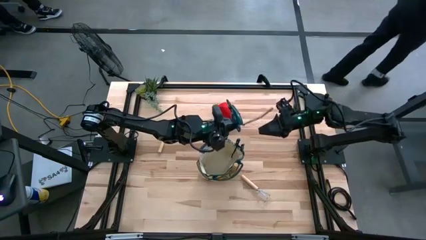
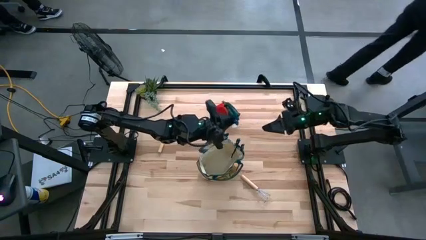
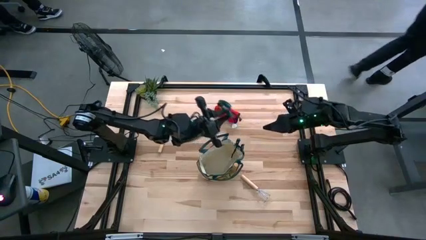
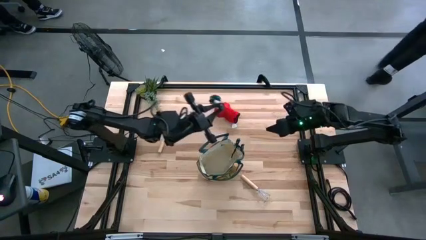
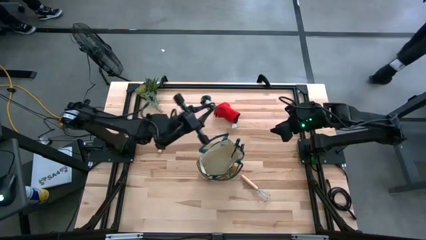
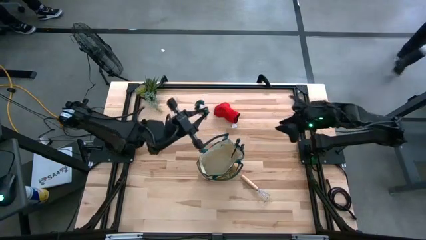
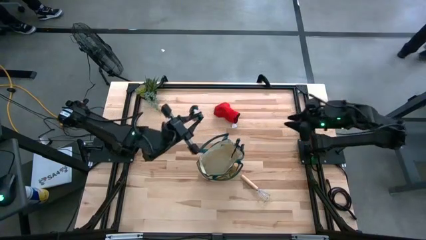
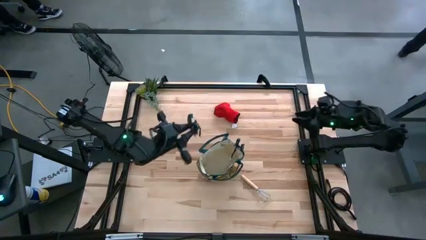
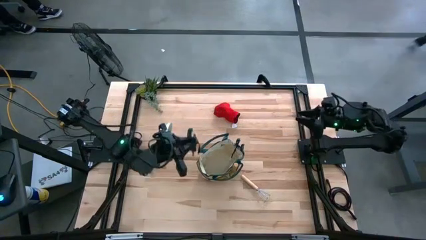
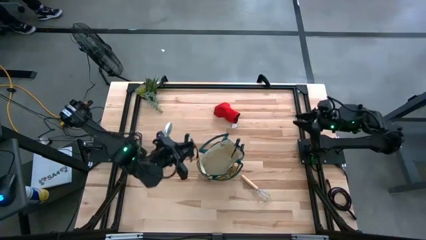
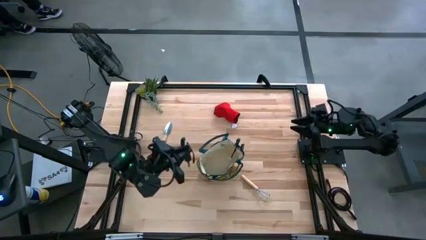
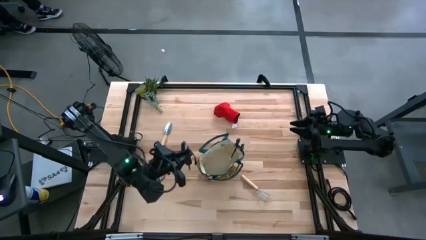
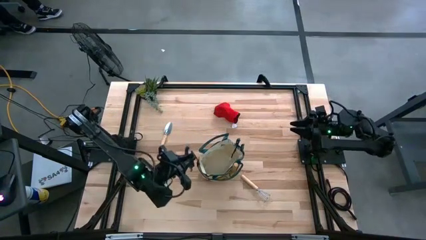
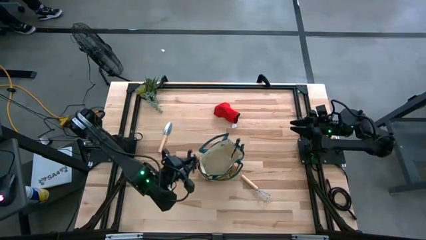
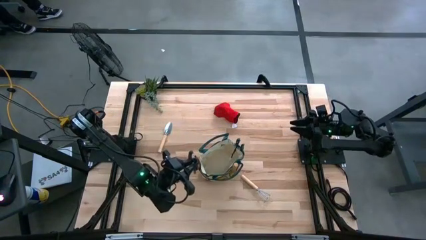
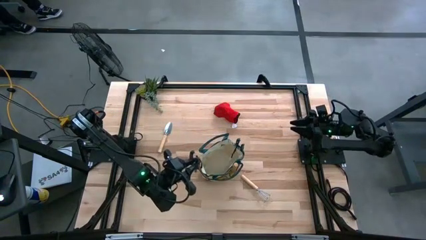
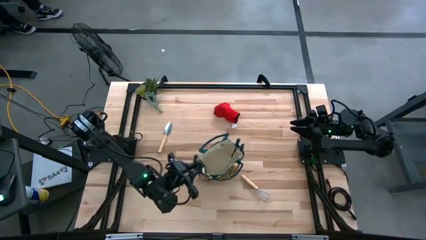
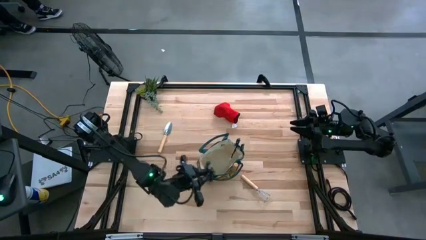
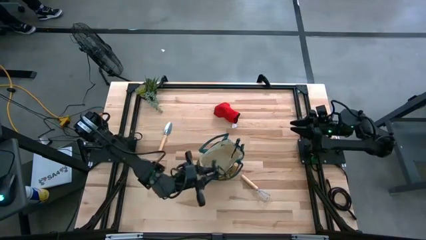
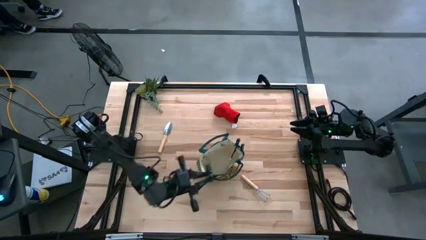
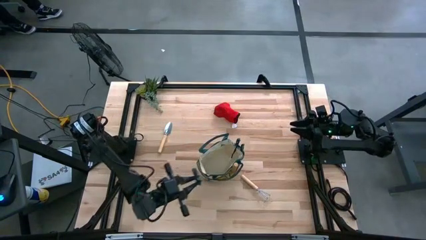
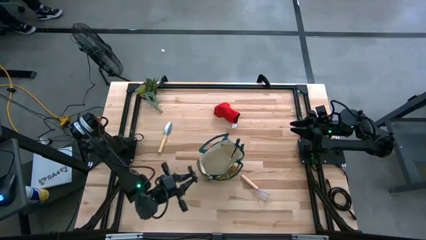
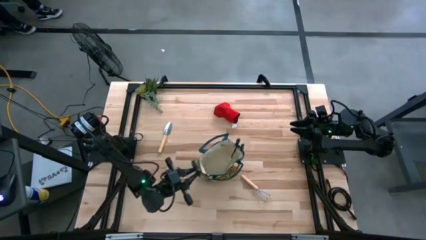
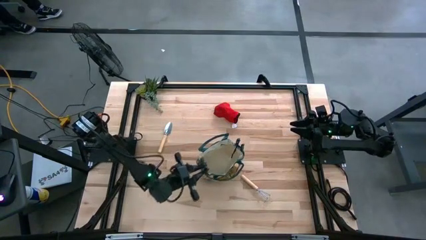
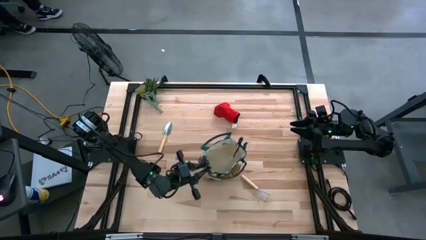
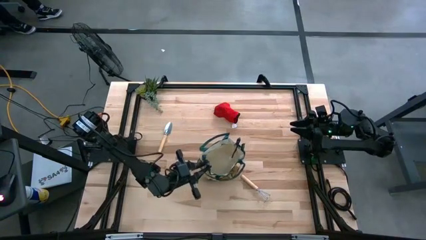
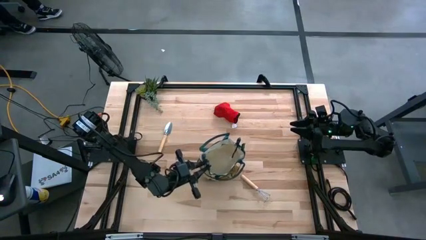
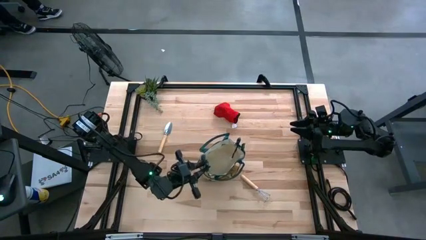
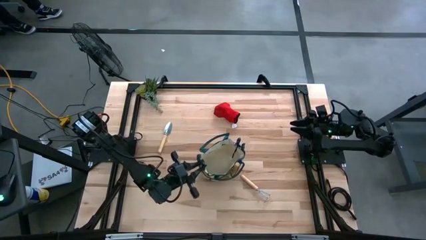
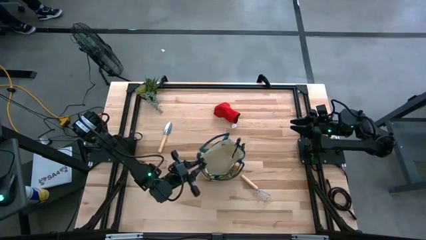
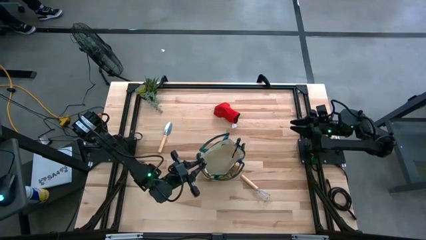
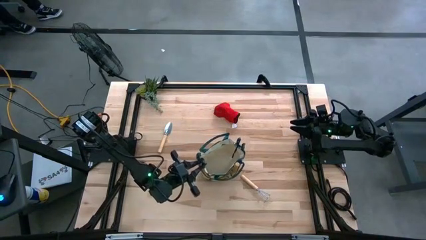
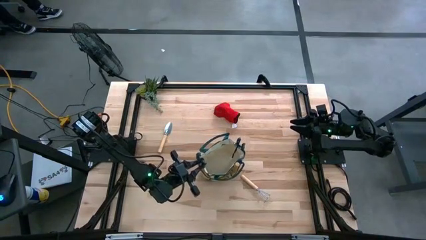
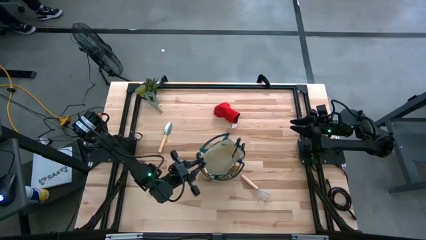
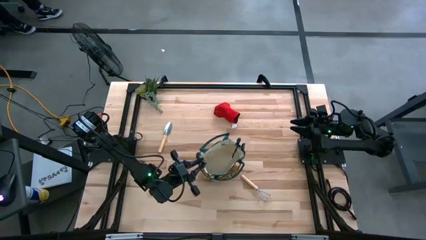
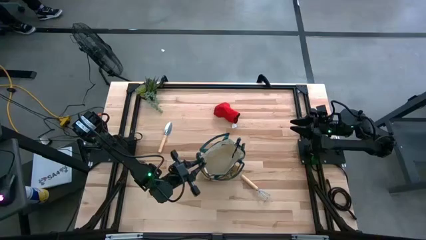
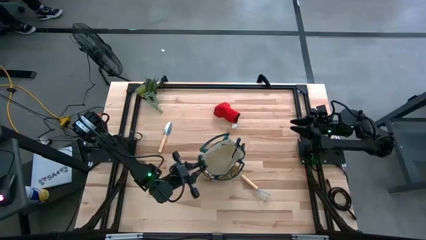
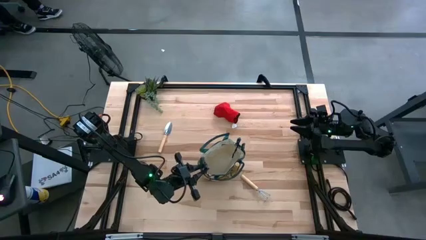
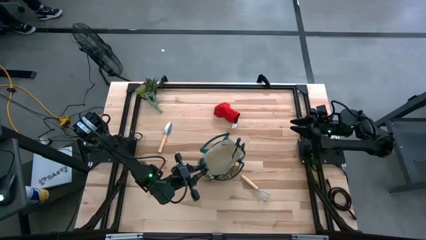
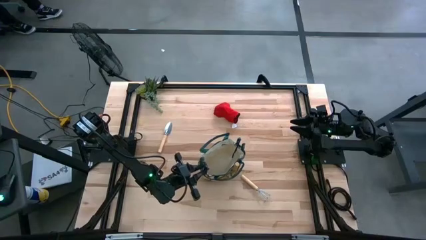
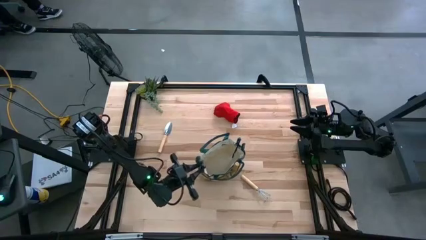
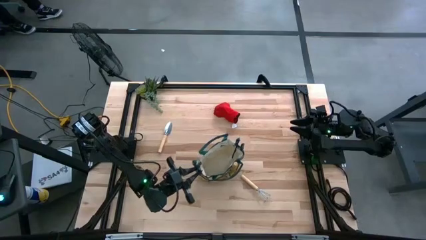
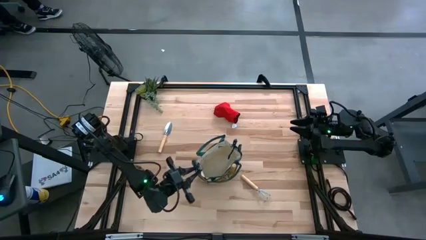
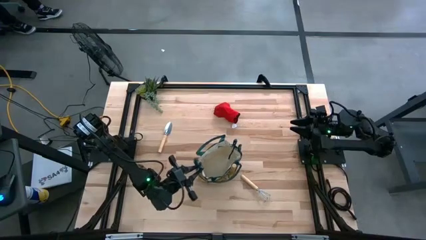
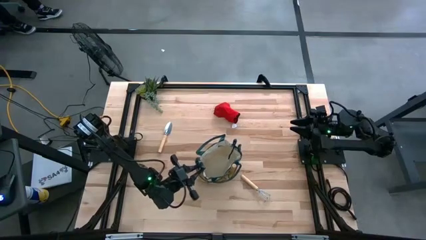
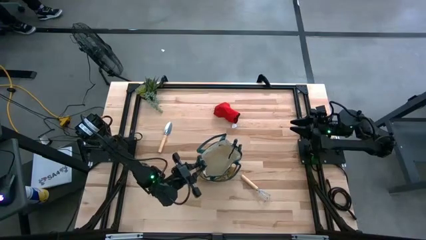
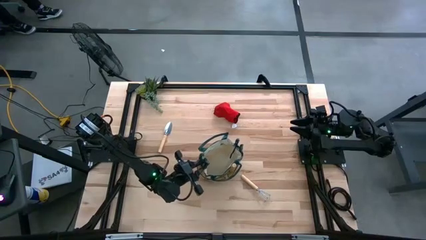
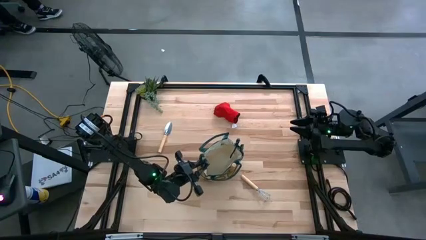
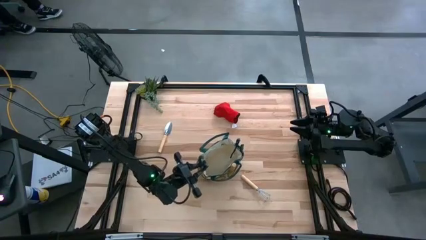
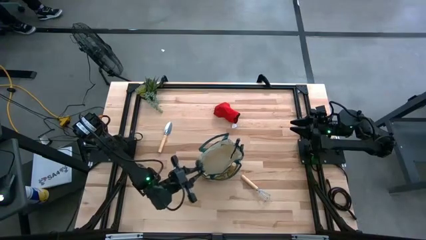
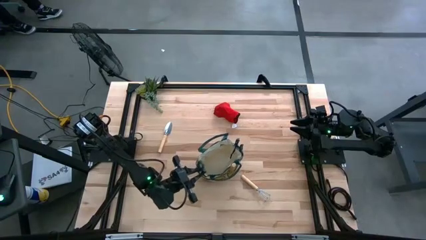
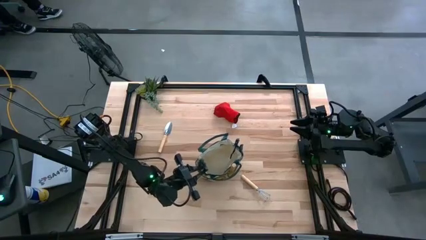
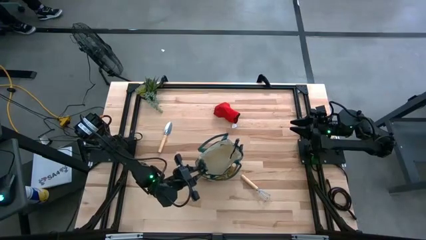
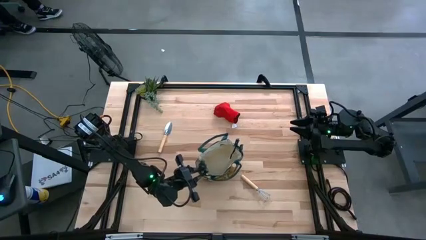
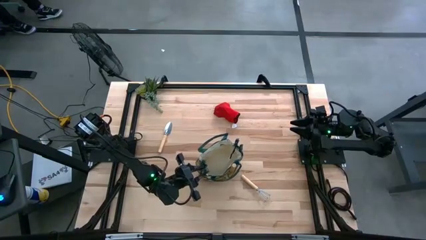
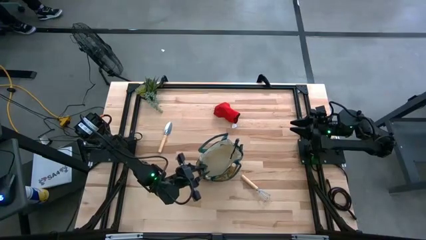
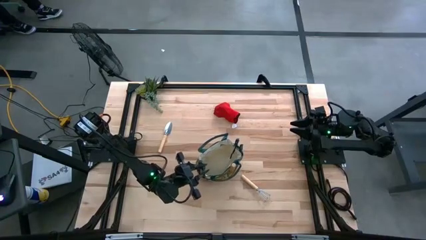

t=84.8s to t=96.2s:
Task: Pick & Place Garden tools in Gardening bag
Put the green shear scissors into the white gardening bag
